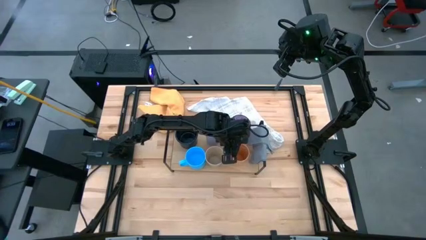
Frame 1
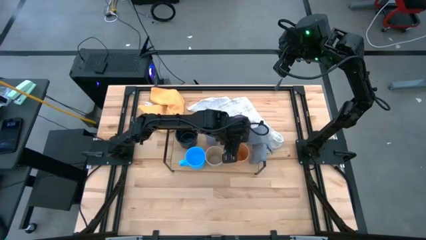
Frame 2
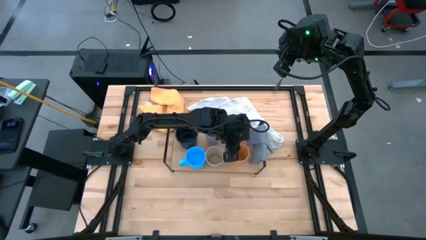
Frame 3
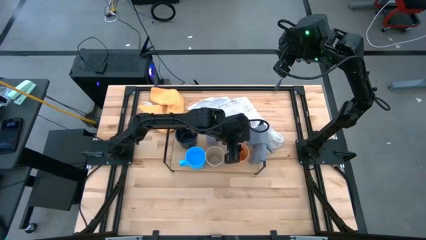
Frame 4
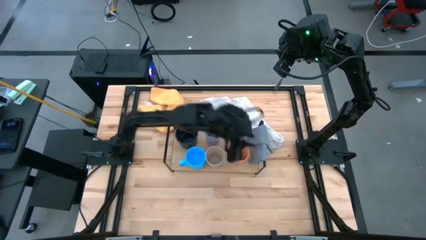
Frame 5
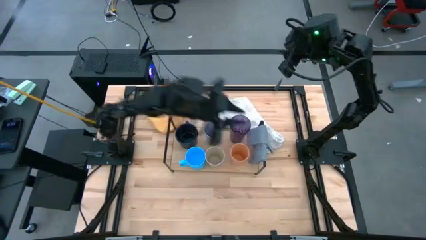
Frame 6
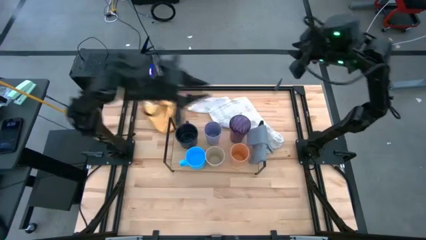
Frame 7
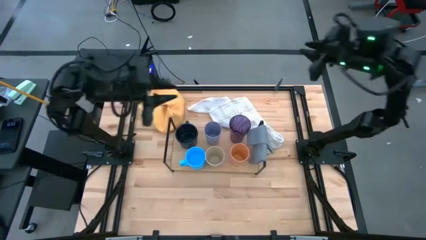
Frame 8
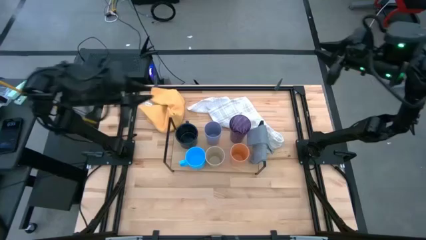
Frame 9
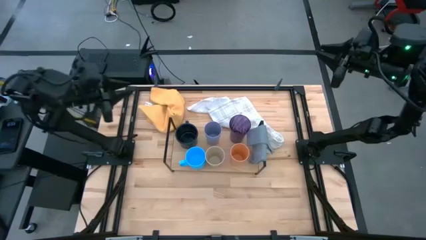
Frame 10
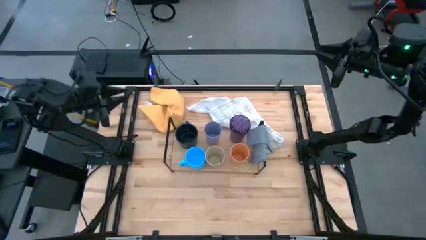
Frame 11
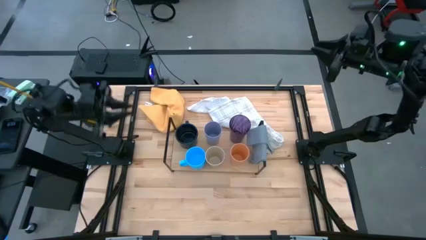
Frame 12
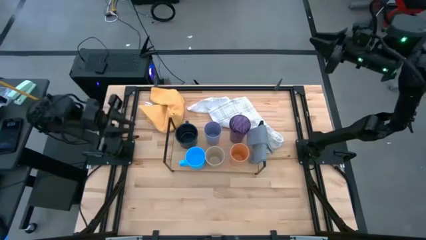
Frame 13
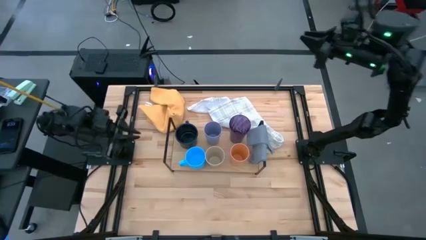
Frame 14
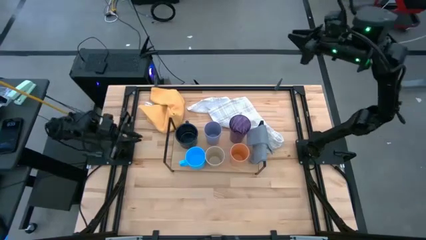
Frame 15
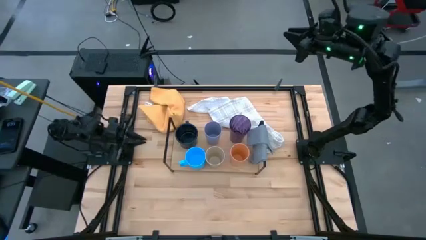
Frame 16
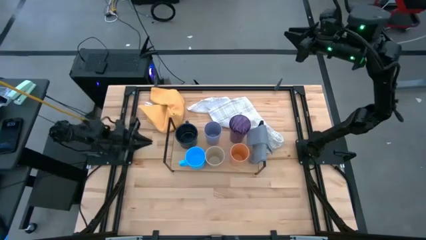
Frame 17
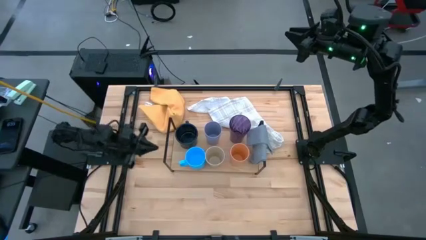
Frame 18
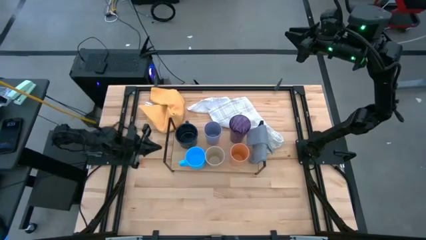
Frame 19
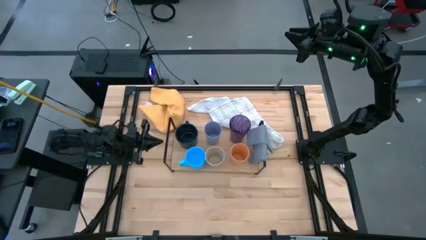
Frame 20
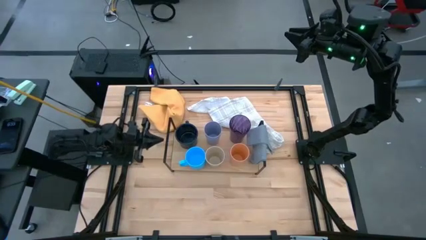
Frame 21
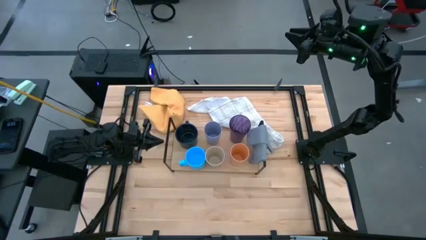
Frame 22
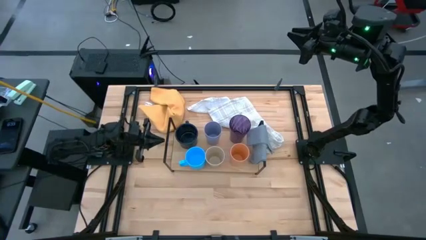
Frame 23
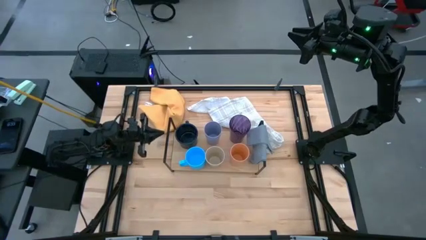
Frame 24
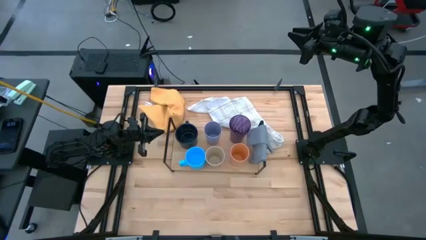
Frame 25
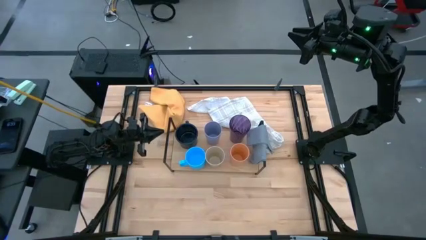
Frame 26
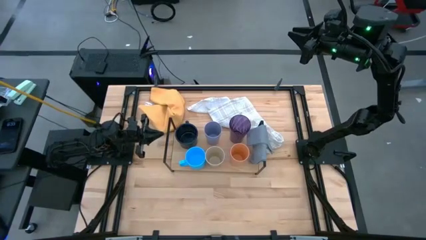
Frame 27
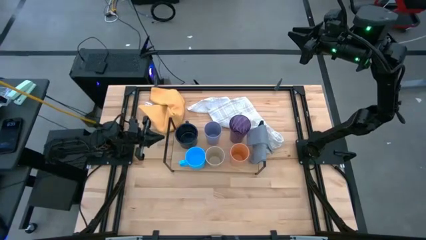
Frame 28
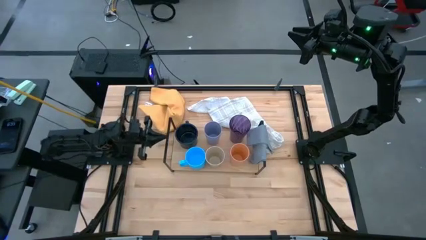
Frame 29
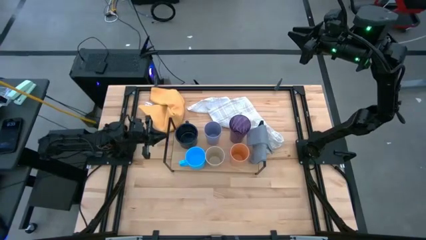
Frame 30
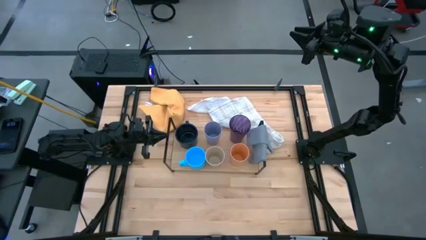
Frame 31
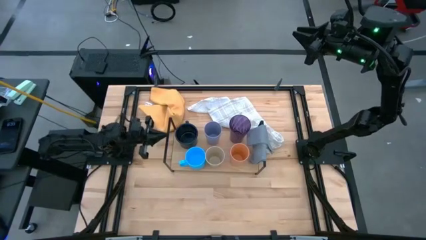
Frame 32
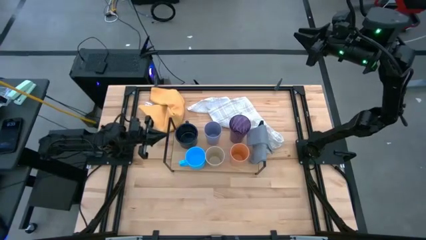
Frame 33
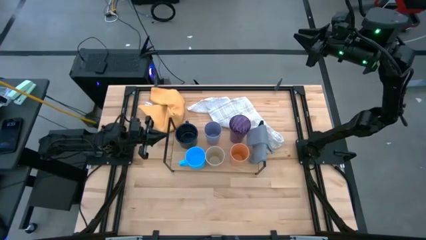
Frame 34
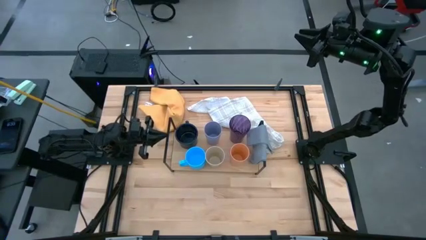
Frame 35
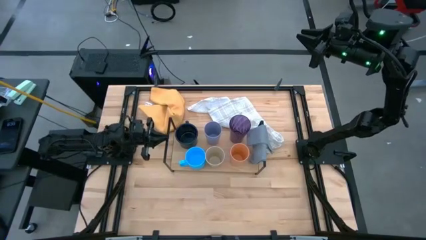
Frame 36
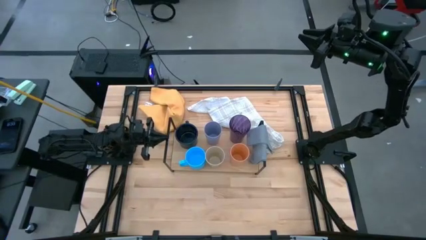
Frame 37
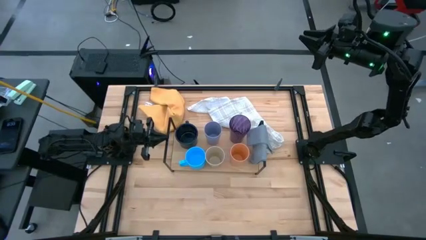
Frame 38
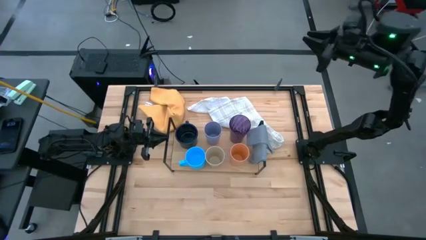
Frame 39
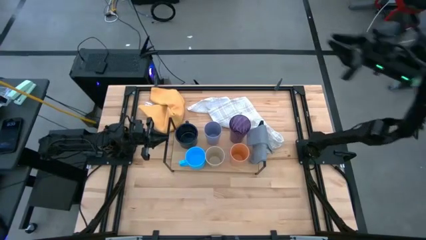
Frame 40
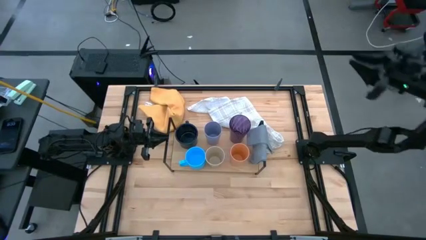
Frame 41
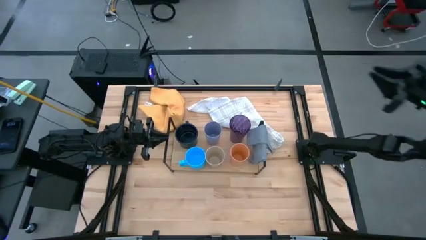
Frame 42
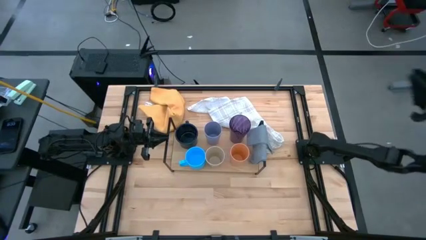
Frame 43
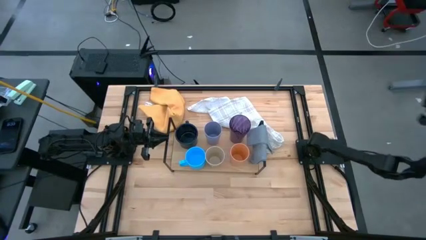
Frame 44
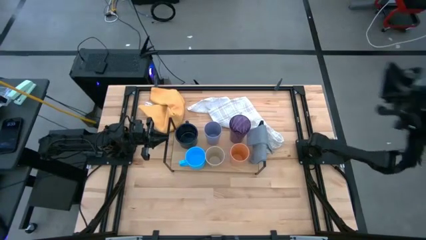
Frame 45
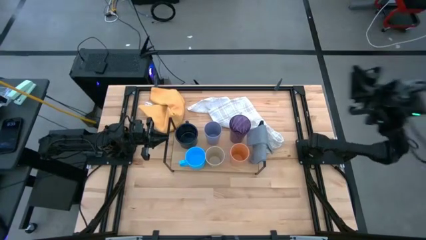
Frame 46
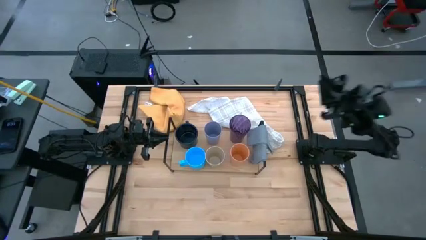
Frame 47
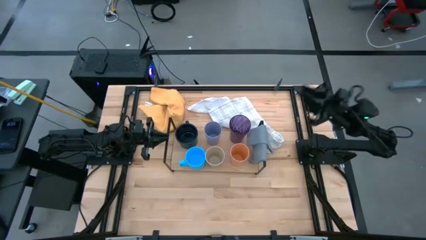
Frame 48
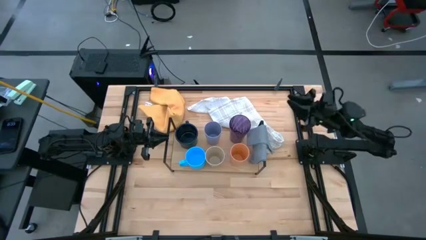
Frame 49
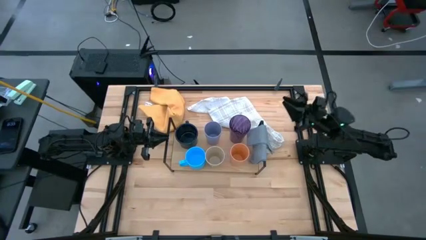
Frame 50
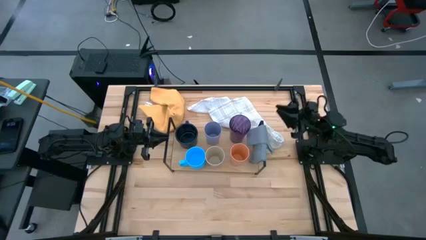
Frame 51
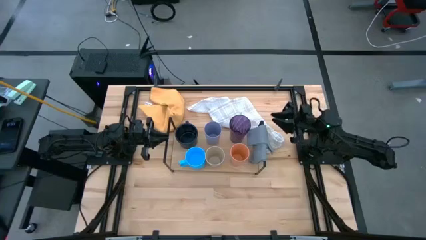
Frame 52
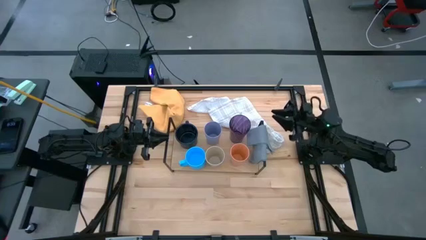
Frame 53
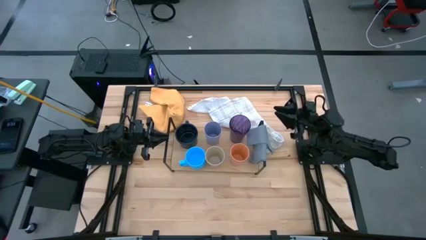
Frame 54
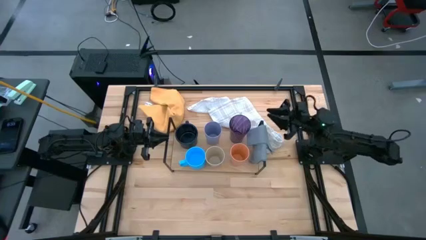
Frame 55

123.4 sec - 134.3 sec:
Task: Stack small to large cups/mugs on shelf
Return to Home Position

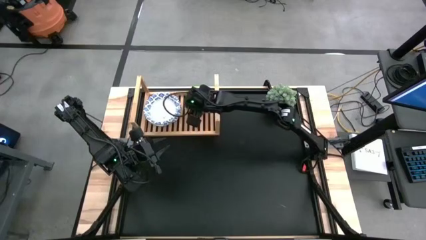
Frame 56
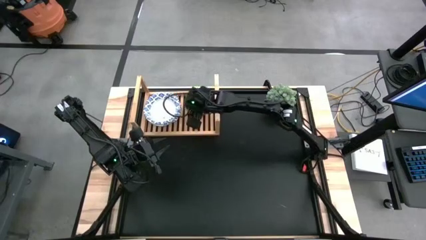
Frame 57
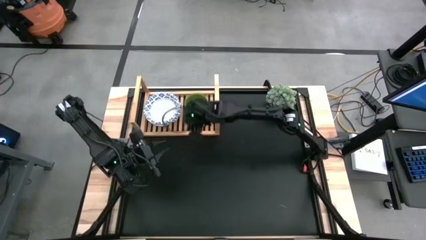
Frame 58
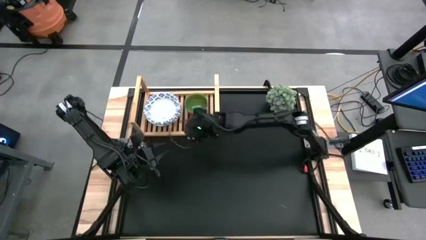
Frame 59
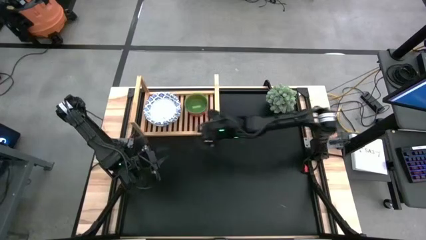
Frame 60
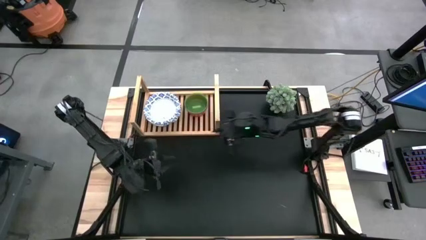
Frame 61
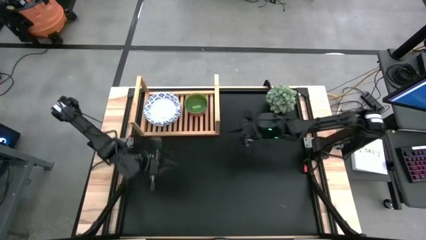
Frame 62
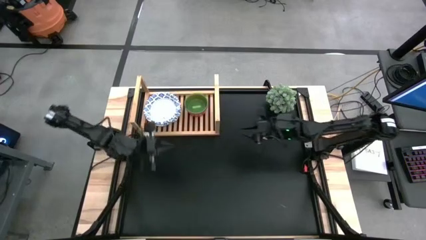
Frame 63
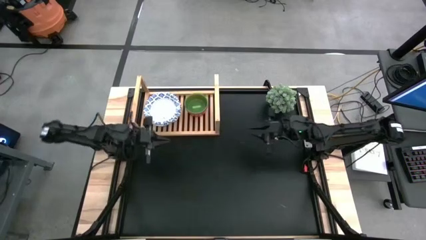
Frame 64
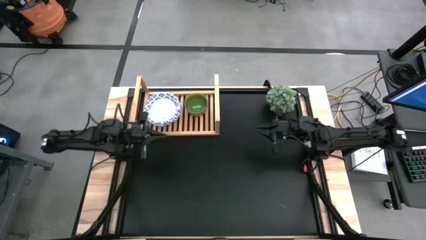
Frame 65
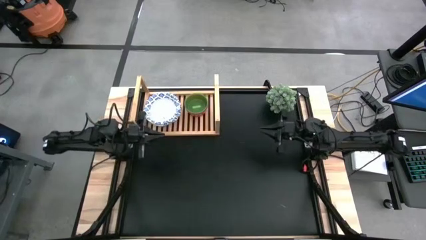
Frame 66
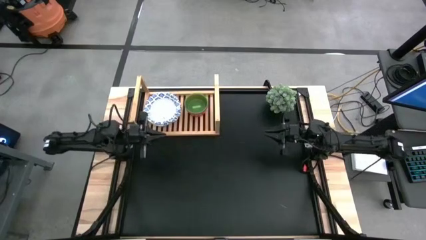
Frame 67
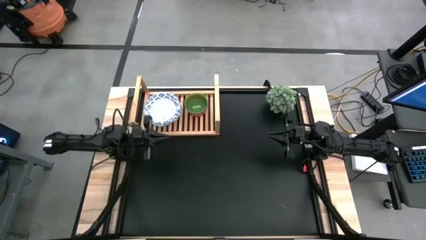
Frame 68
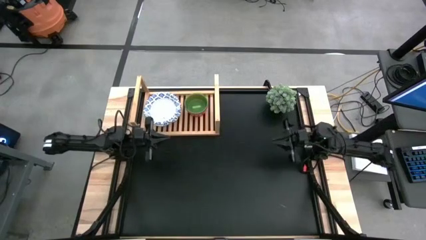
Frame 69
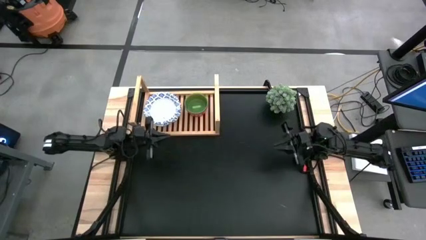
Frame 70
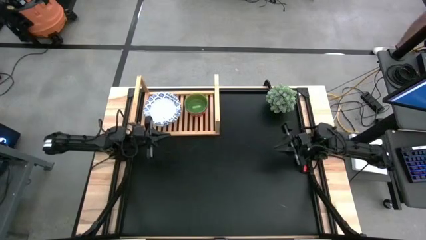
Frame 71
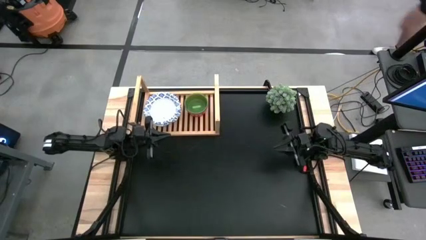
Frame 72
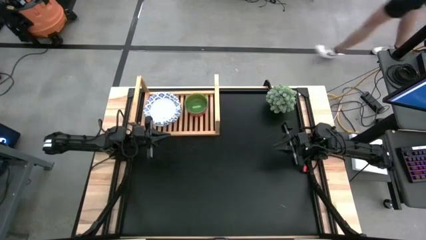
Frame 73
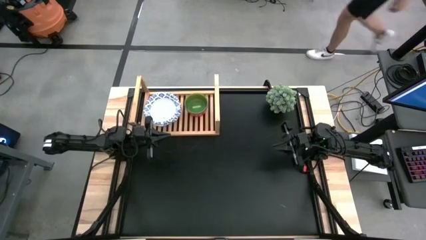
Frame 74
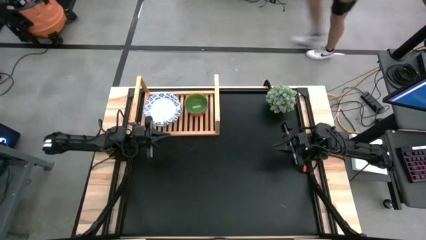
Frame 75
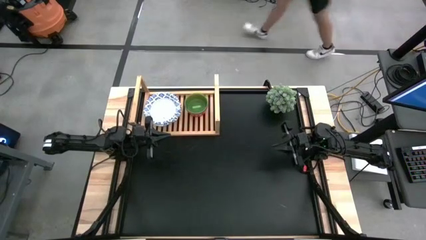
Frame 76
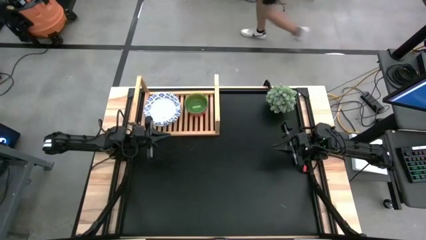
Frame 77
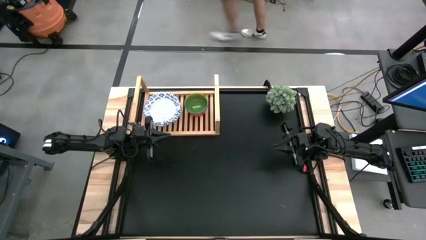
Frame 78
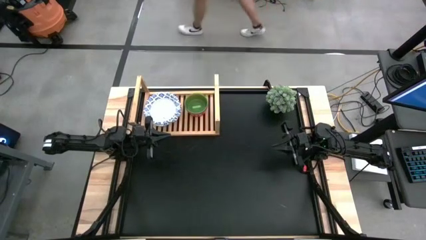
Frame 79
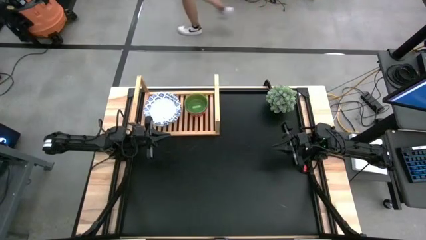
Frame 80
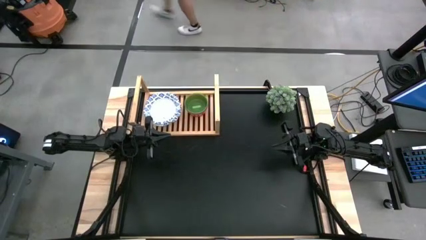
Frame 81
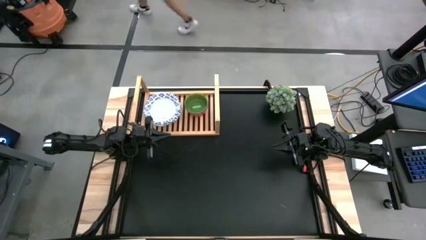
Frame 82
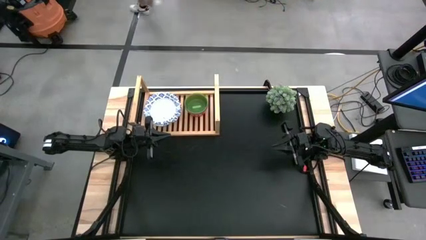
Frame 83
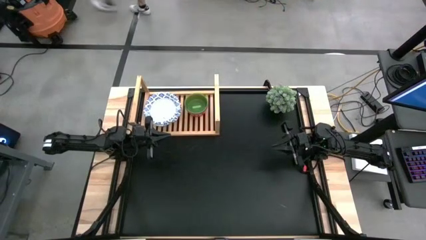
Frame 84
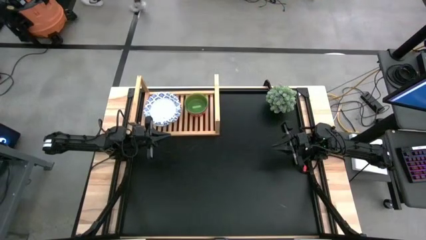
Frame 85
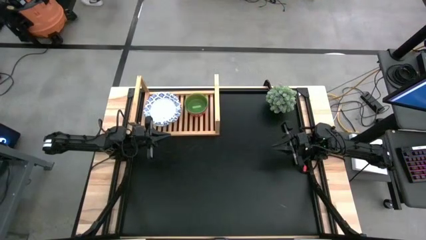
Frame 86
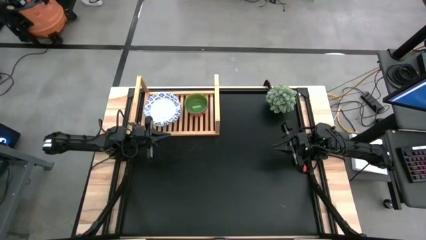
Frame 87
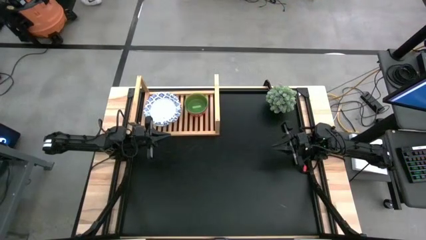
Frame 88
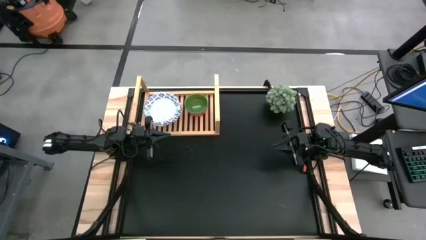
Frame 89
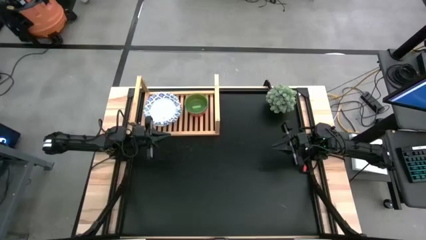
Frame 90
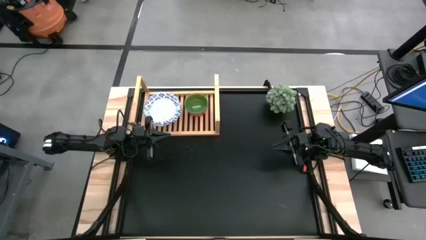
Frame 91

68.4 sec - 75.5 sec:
Task: Place and stack plates onto a shelf
Return to Home Position
